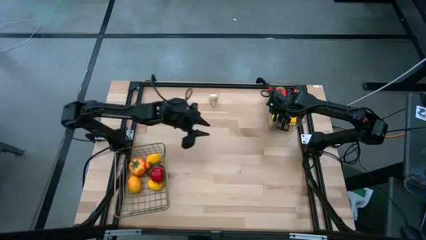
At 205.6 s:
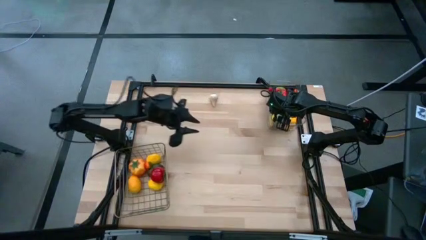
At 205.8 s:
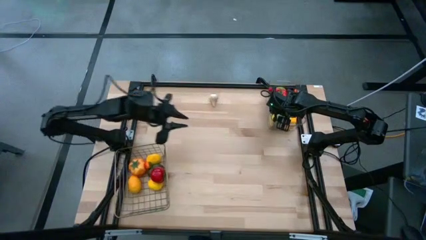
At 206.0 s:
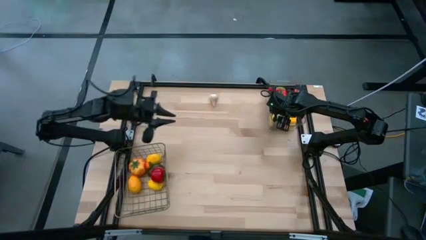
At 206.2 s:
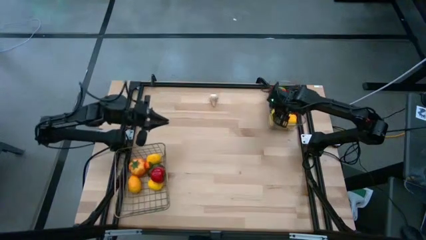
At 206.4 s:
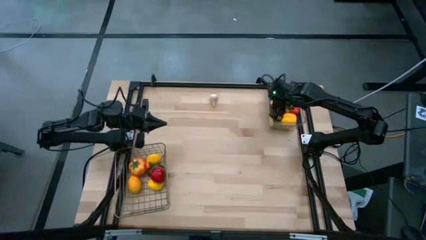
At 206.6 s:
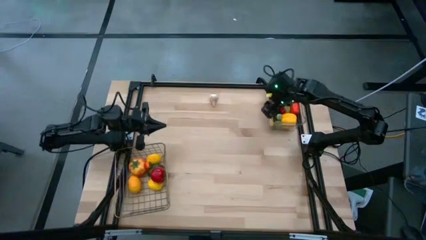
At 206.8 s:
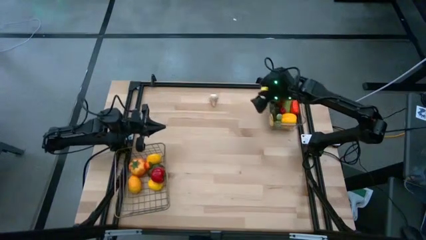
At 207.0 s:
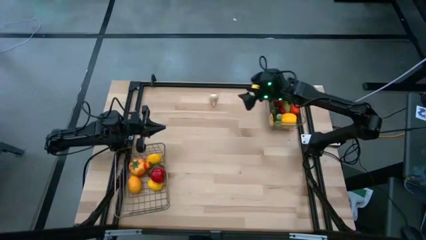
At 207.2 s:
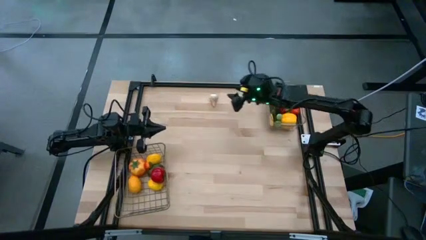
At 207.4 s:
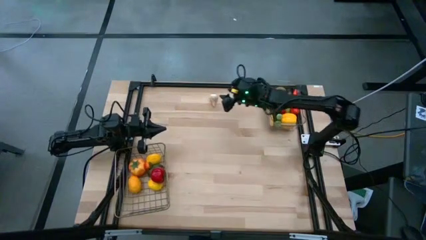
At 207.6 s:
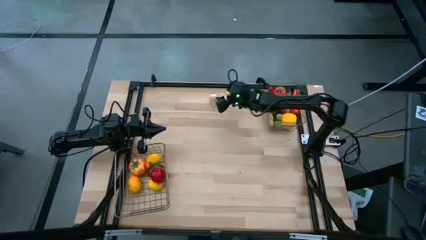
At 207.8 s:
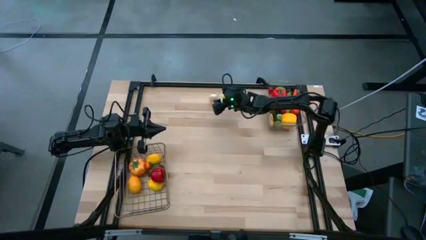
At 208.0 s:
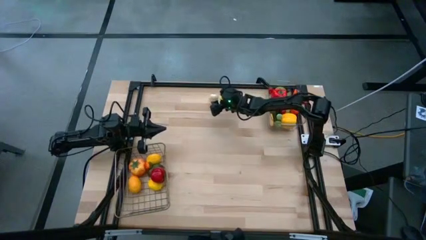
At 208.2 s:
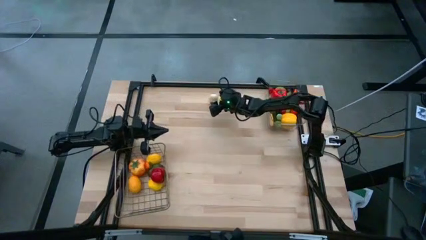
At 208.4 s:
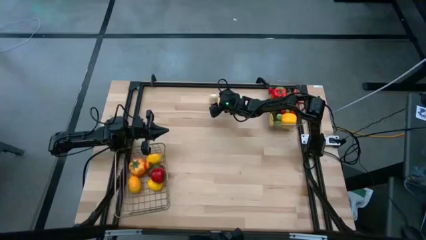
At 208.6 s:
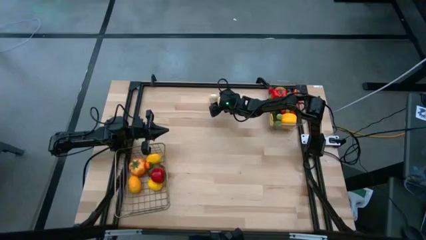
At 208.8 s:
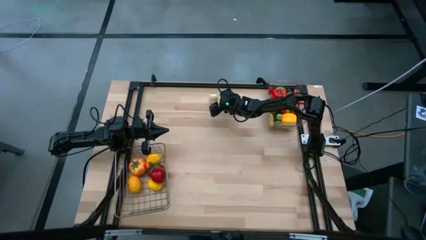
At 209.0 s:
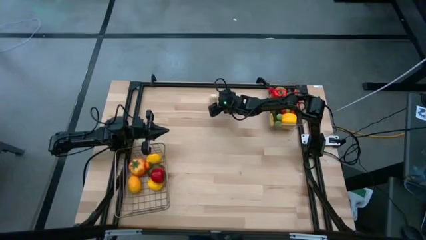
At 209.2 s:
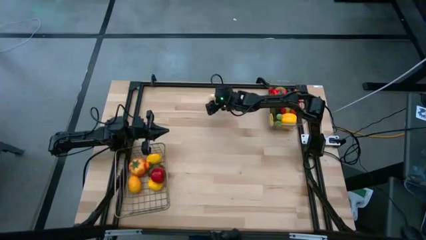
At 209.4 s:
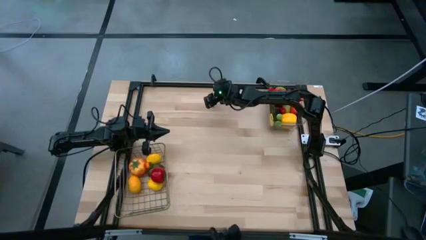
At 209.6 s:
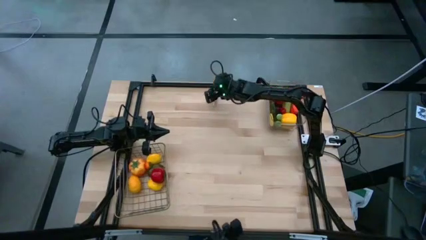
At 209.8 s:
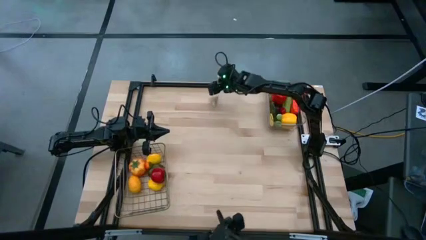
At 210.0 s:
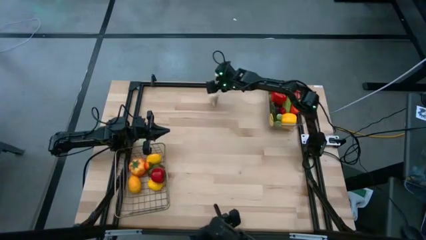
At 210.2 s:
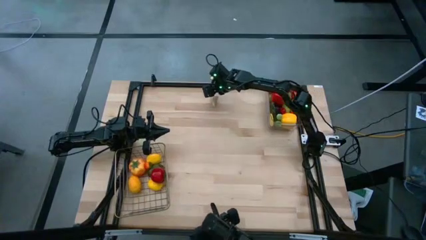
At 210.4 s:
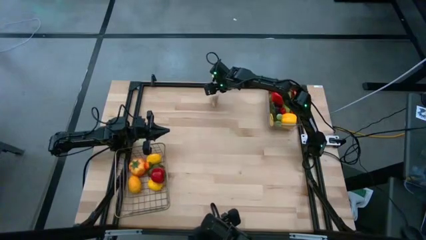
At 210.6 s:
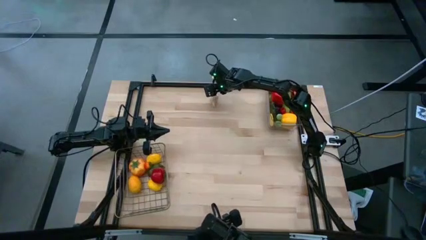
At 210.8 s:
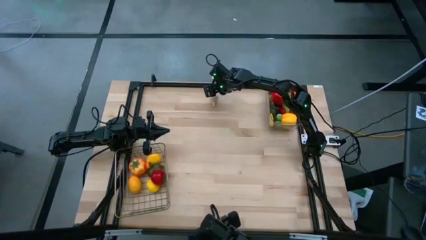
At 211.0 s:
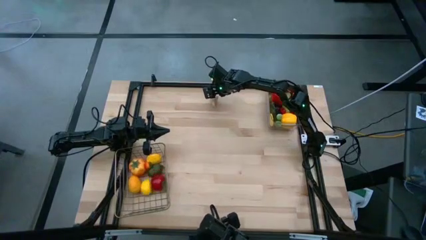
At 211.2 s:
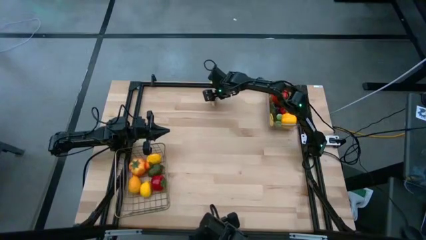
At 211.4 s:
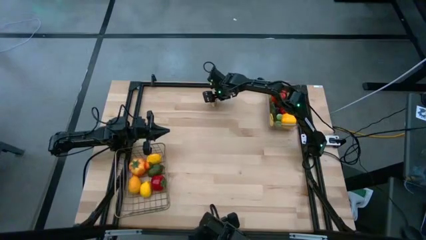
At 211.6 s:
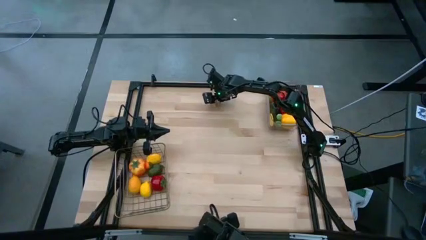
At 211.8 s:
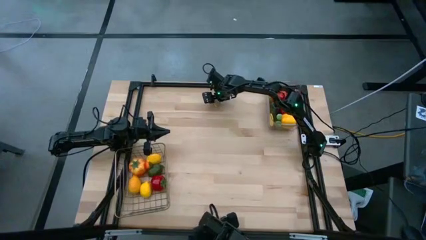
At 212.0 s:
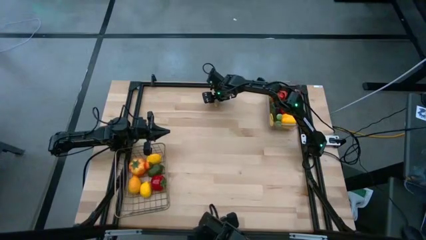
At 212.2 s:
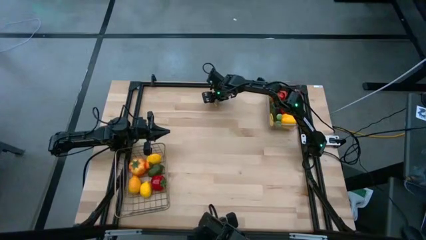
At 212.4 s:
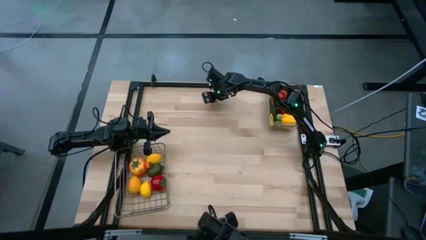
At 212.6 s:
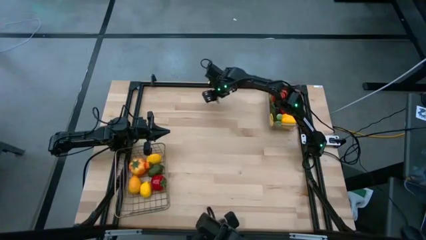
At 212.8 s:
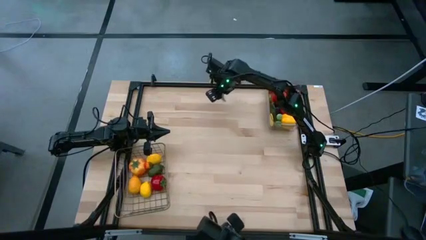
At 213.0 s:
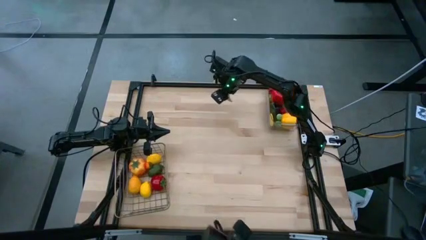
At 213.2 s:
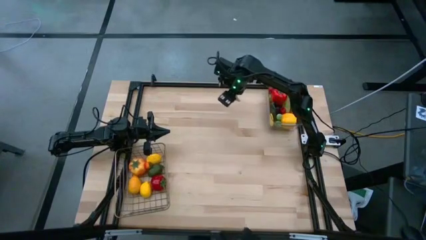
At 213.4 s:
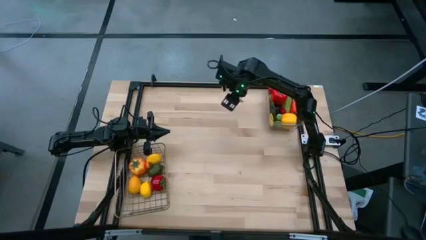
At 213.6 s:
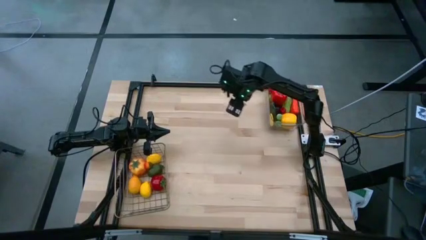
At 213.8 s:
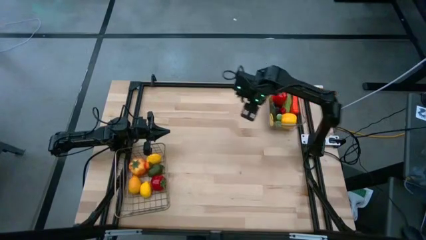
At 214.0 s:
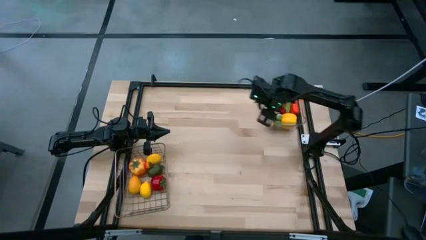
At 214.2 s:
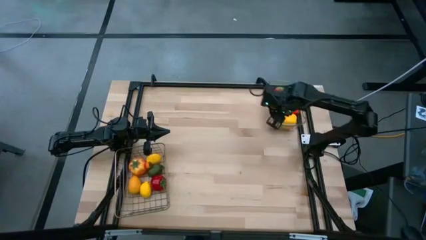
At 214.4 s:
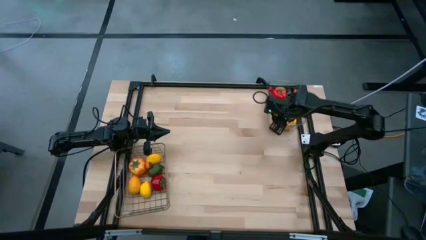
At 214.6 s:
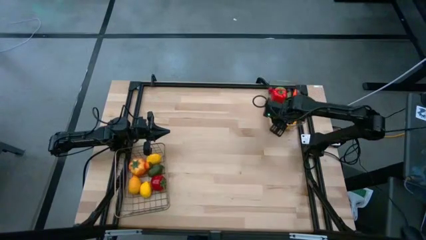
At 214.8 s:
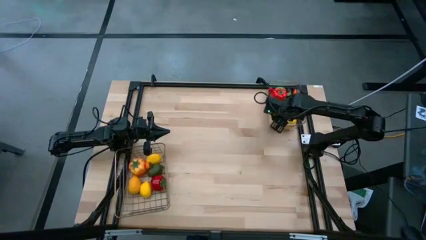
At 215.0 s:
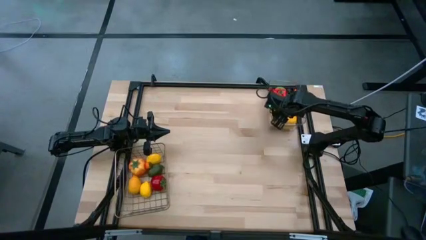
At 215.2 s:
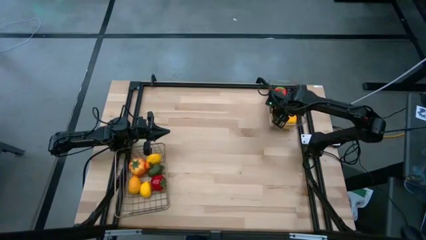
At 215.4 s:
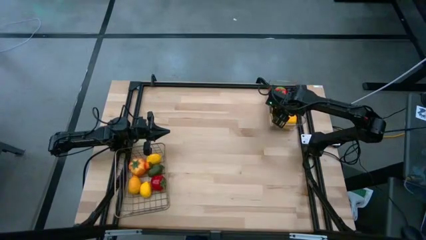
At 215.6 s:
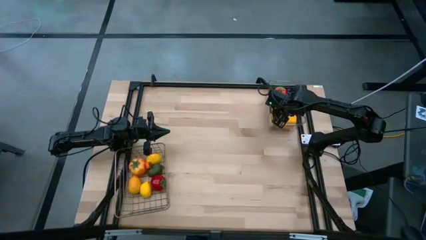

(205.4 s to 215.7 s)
Task: Sort produce into baskets
Put the white garlic into the transparent bin
